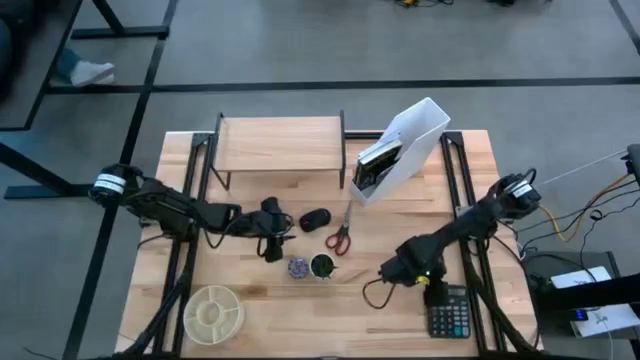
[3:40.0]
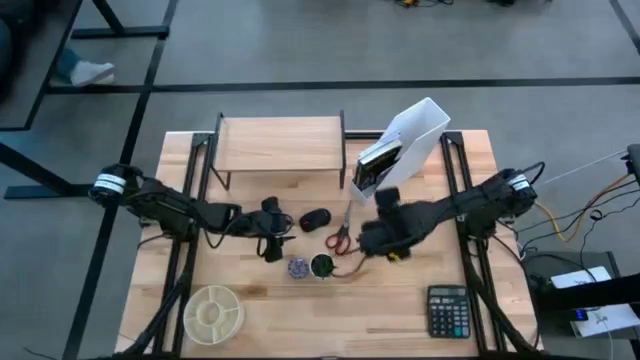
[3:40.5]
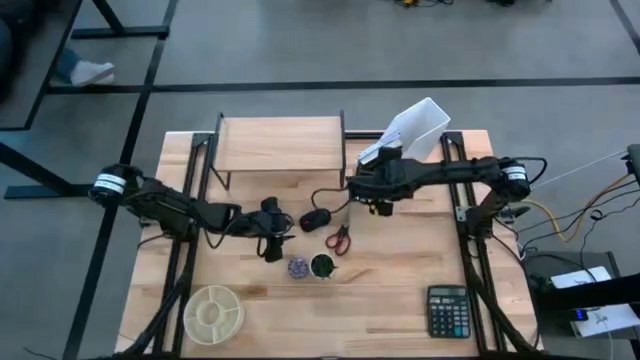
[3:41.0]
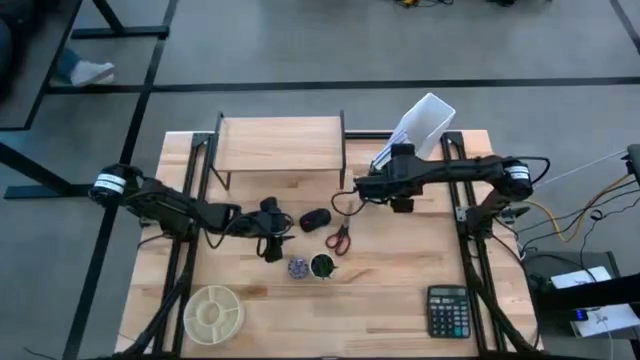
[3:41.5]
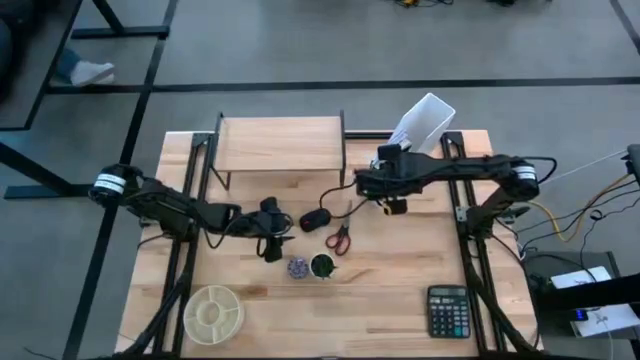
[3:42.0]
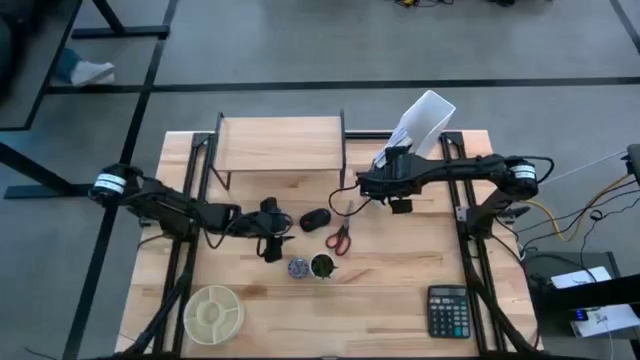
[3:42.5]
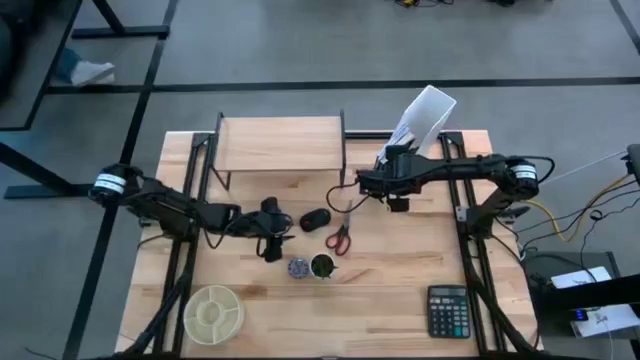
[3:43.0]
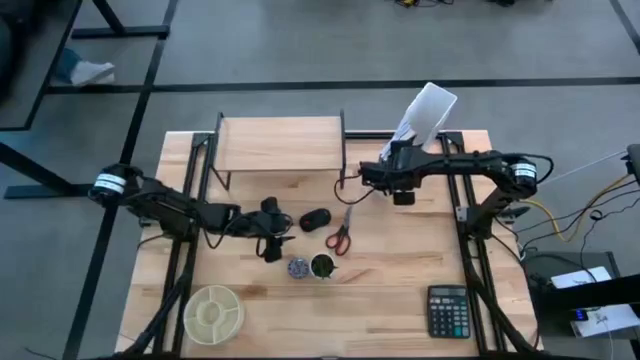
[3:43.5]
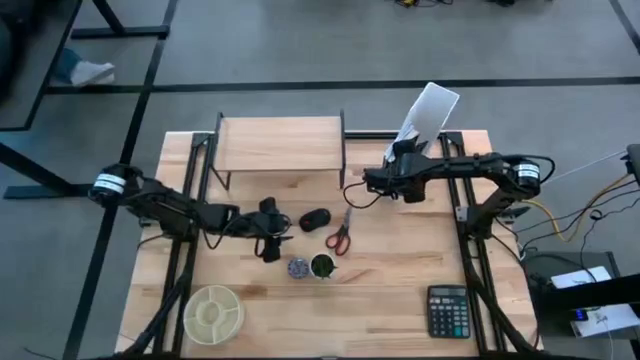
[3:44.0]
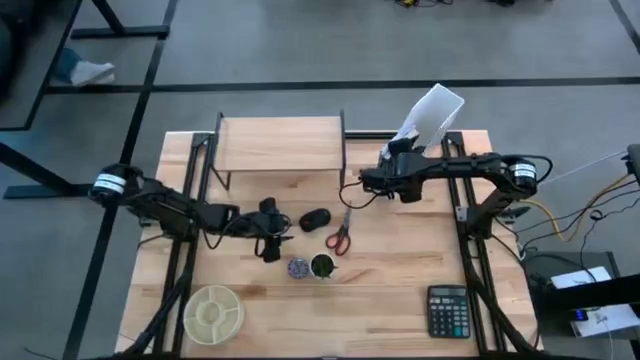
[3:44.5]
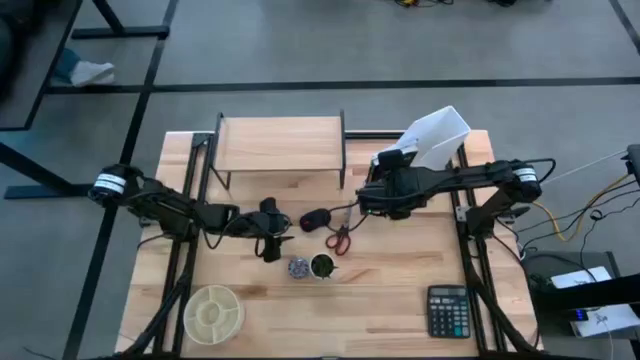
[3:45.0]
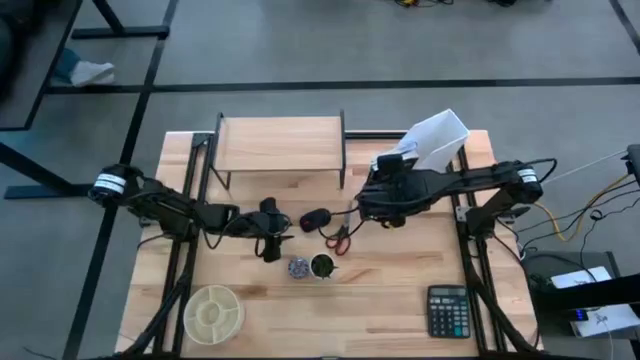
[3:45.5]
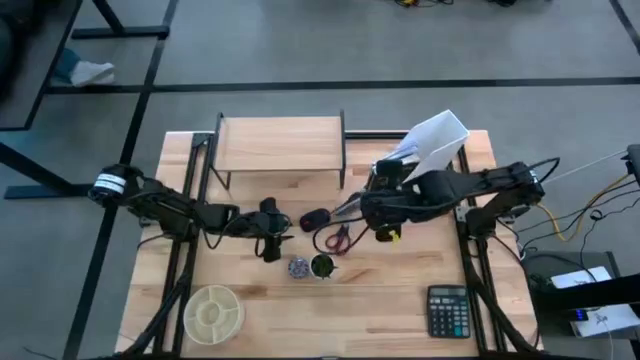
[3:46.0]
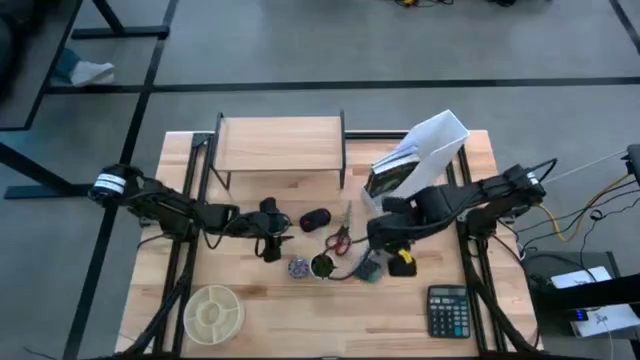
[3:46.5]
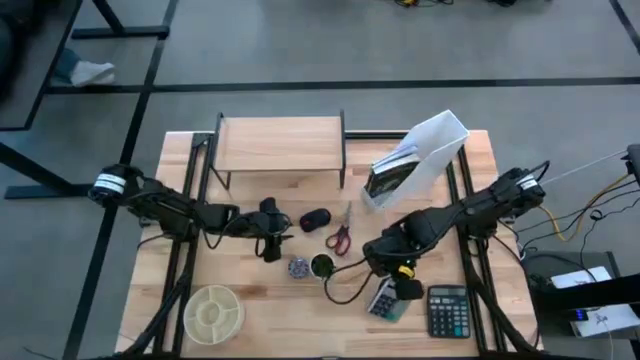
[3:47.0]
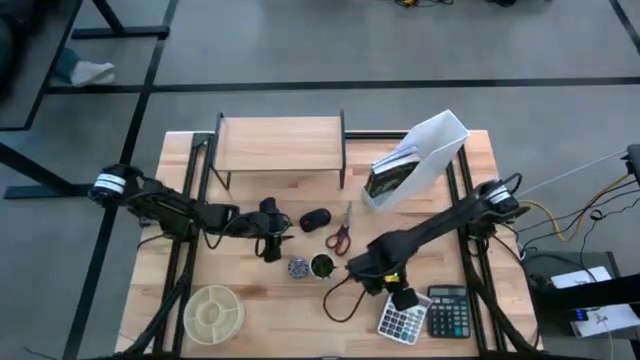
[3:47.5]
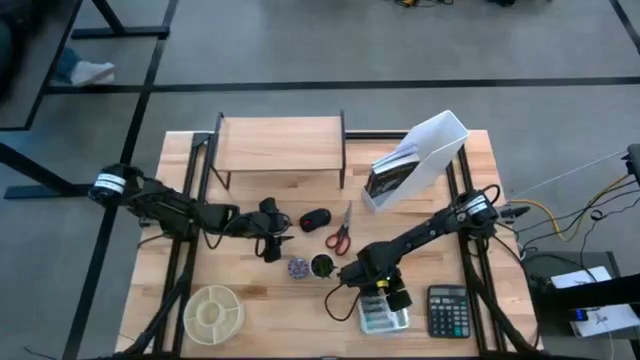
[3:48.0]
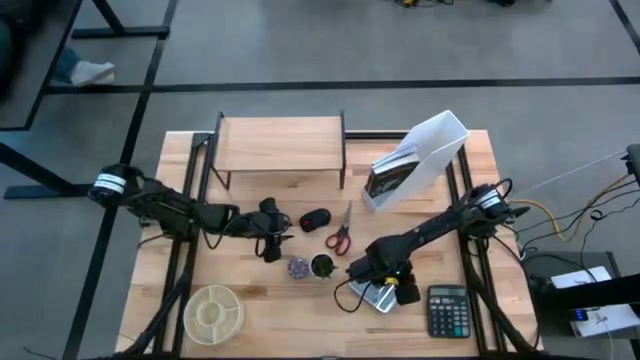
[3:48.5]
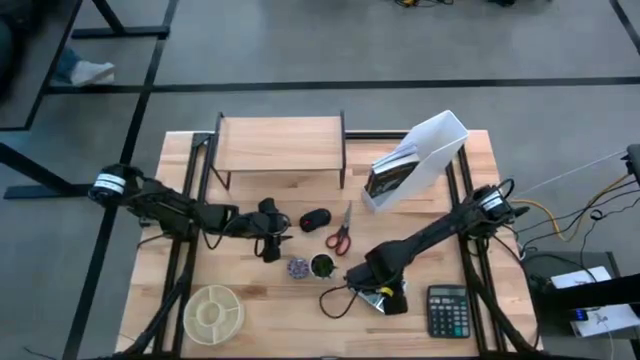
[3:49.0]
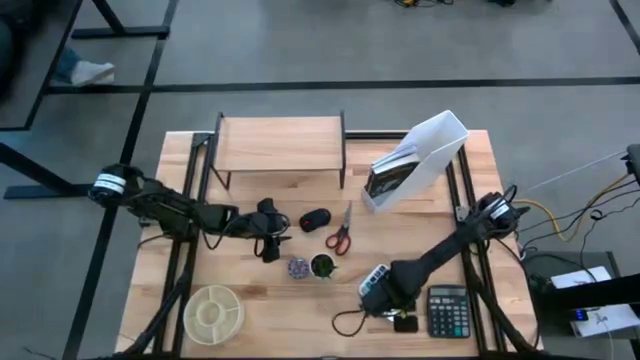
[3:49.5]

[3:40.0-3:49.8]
Task: Stock shelves
Remove the white calculator from the white file holder

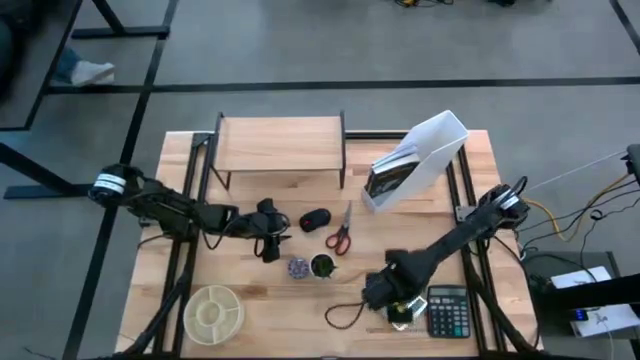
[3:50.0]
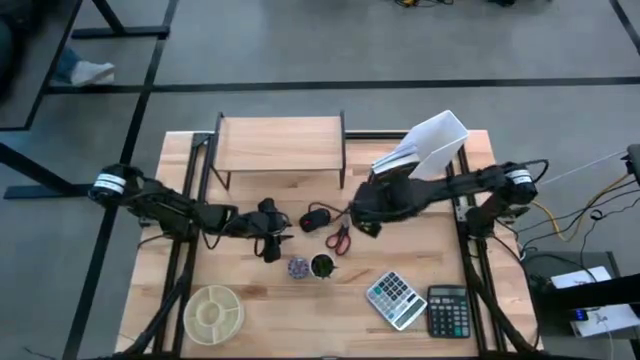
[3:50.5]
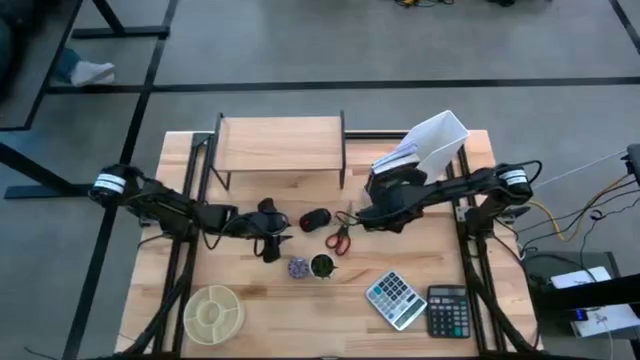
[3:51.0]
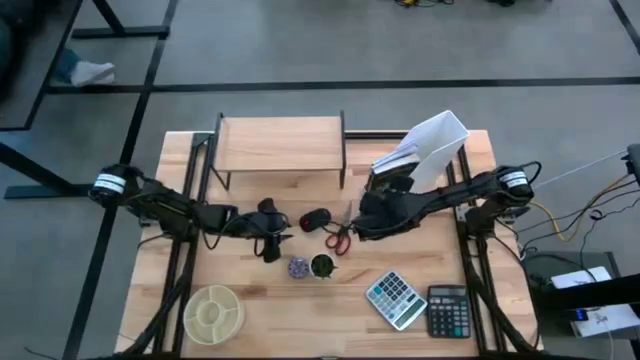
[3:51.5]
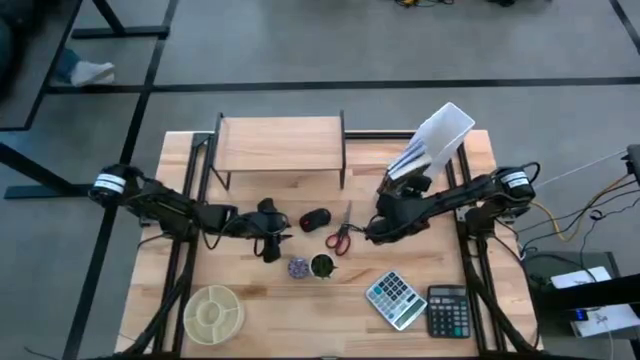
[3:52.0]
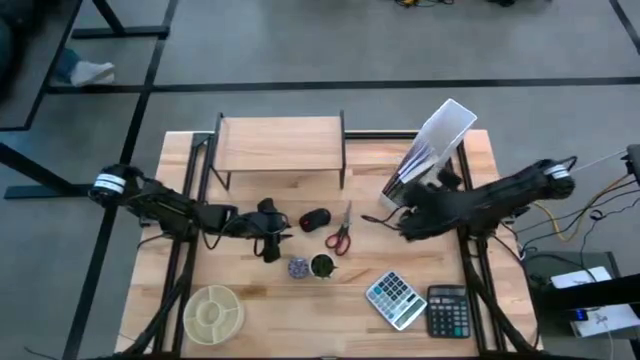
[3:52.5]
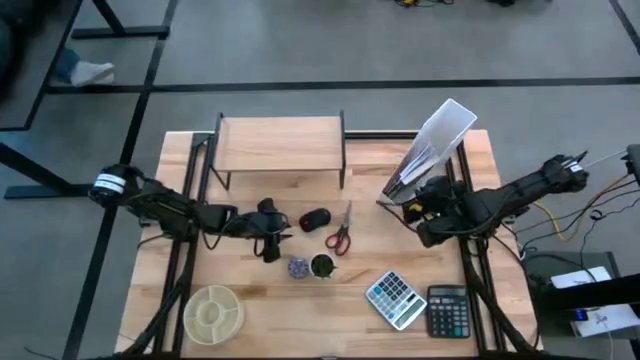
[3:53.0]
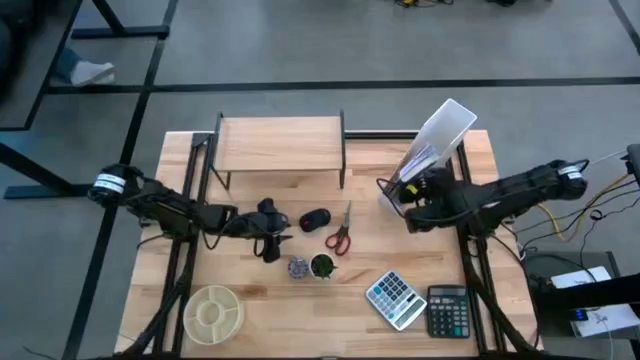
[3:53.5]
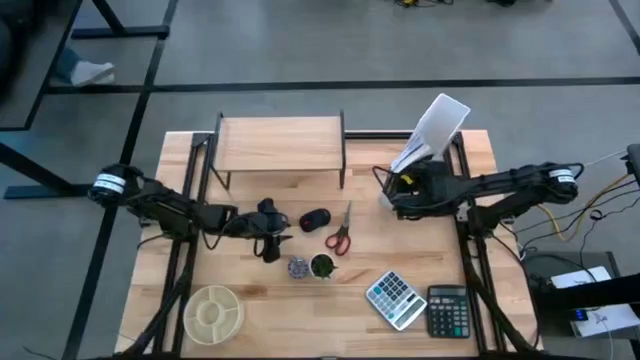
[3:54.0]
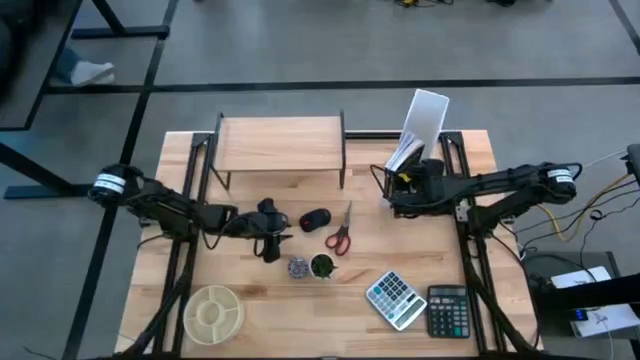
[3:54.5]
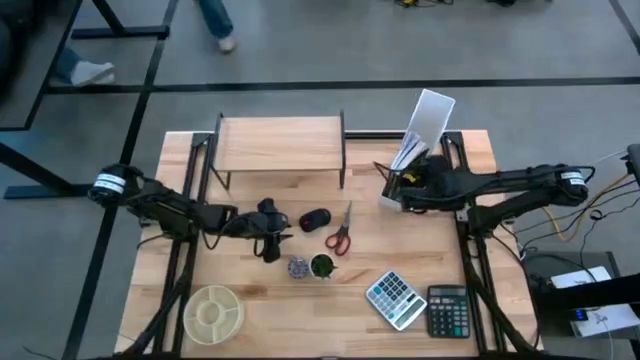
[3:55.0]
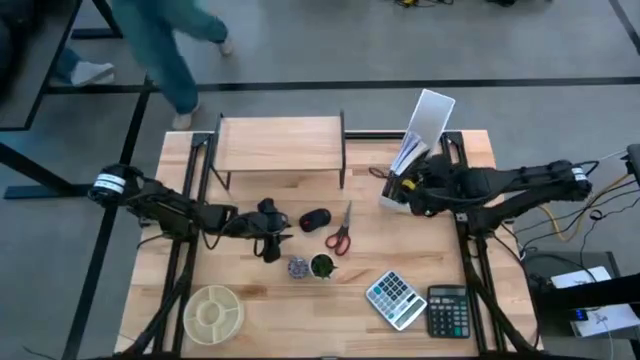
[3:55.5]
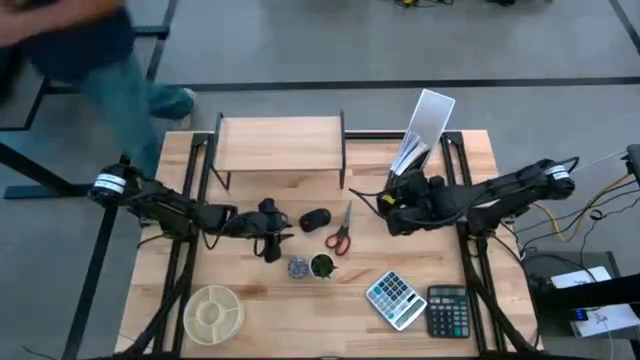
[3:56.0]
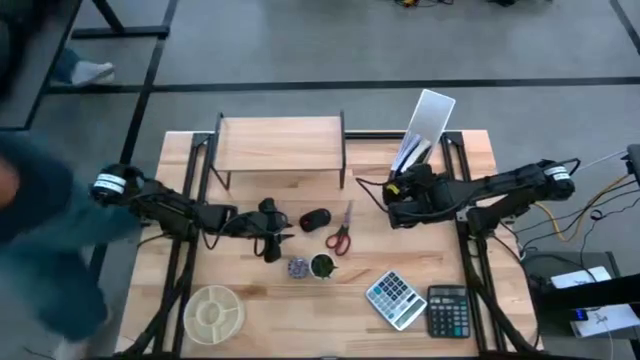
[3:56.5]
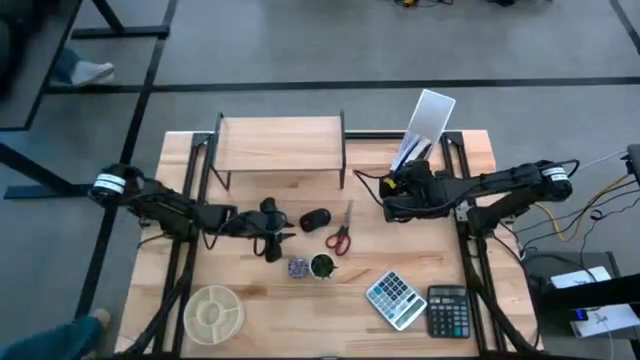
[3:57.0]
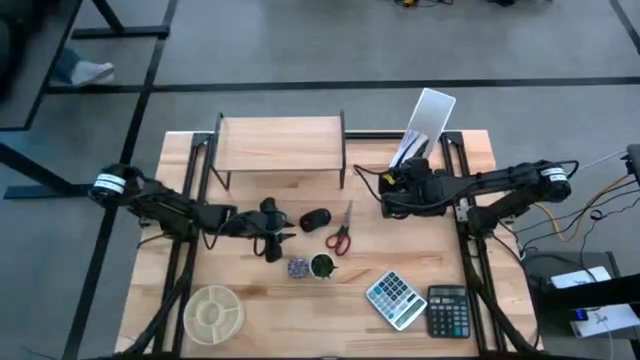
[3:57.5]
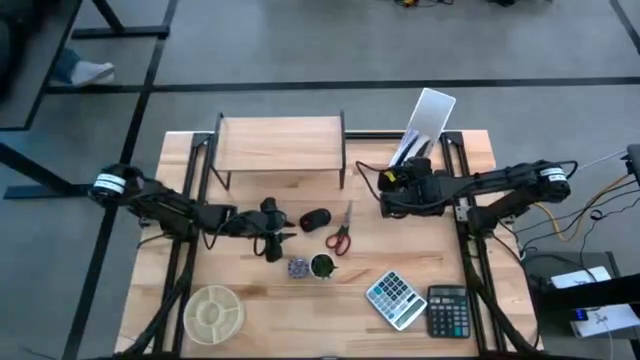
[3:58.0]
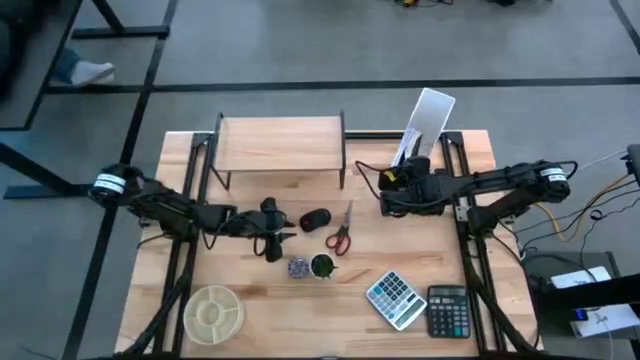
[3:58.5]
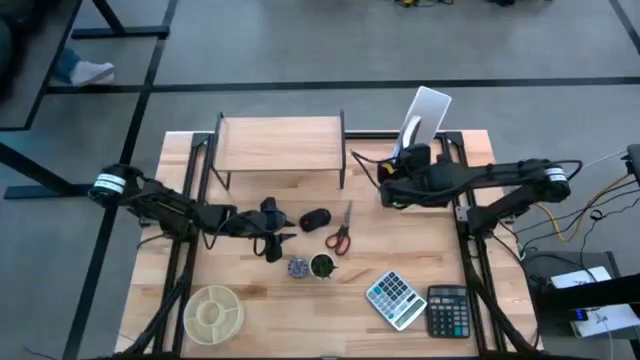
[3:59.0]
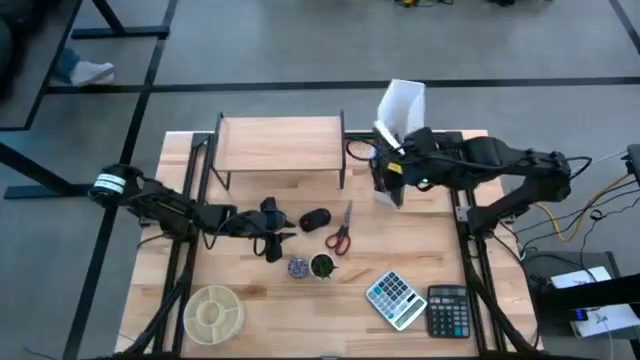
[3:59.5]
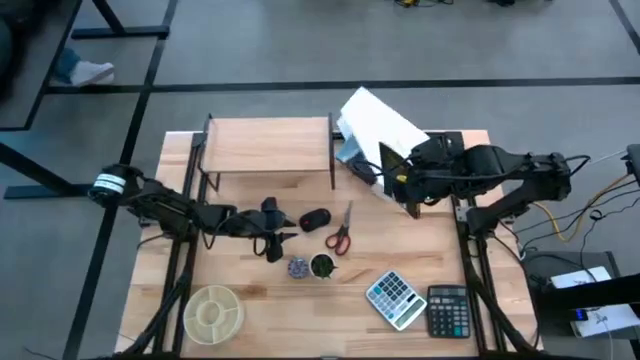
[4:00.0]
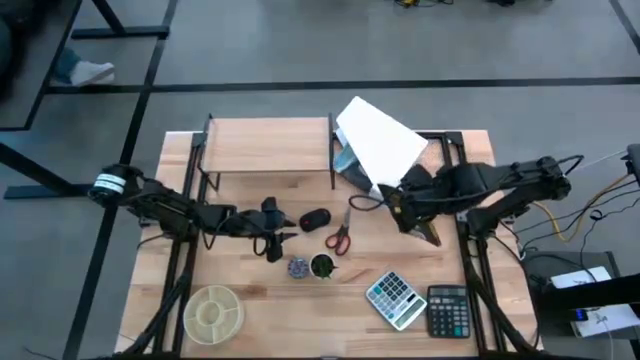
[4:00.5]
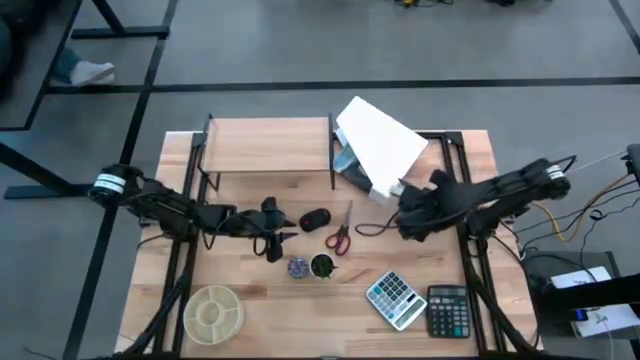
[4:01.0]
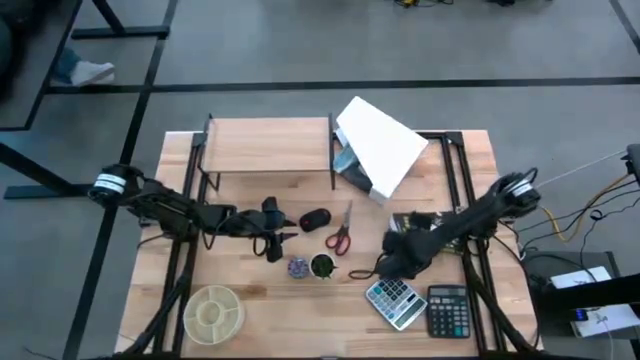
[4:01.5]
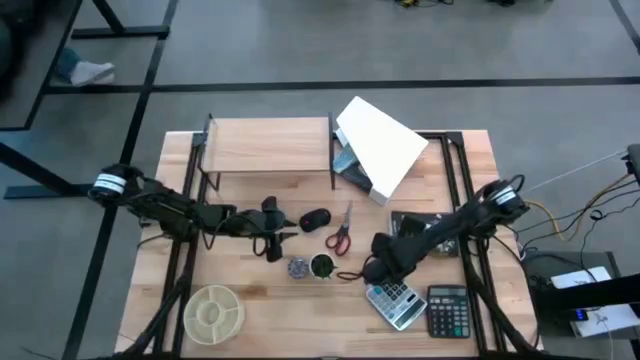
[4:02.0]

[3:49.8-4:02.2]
Remove the black book from the white file holder
